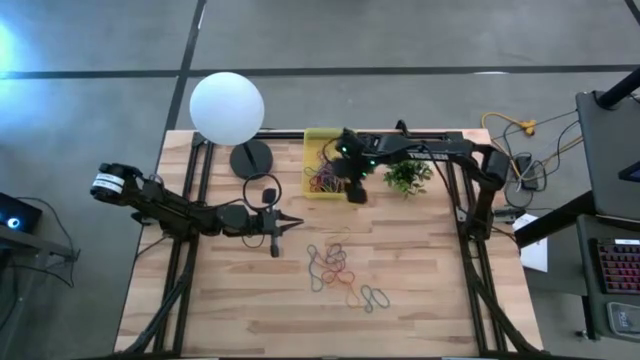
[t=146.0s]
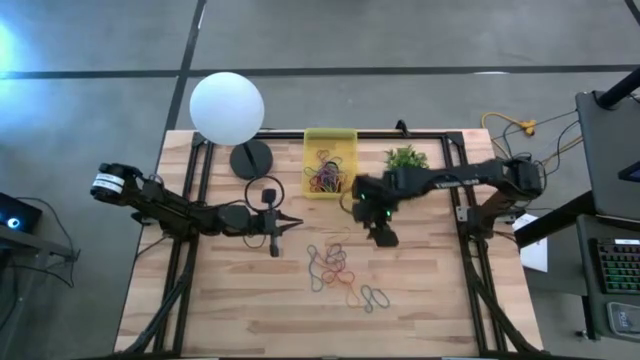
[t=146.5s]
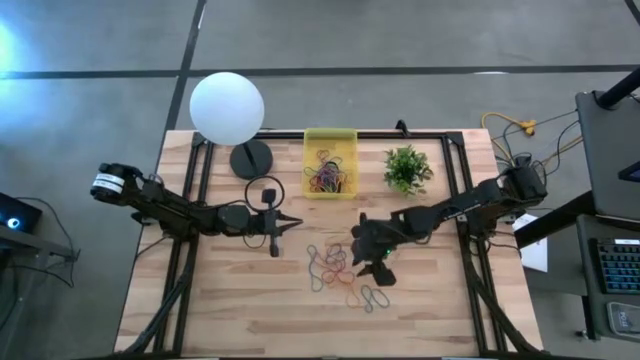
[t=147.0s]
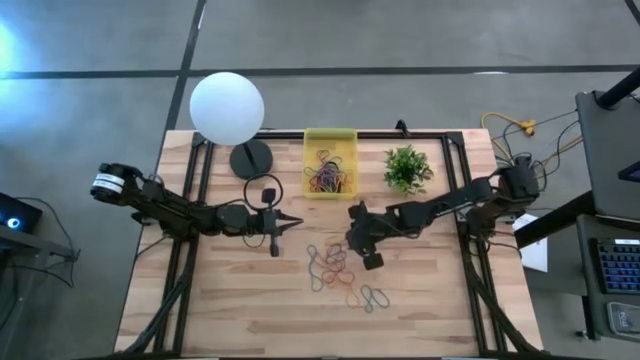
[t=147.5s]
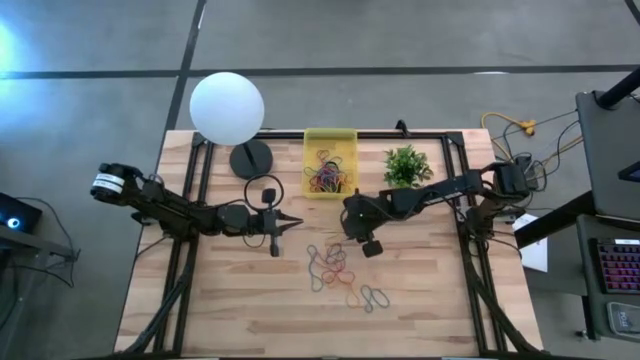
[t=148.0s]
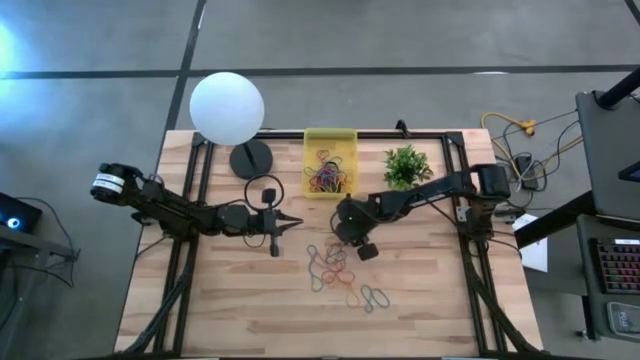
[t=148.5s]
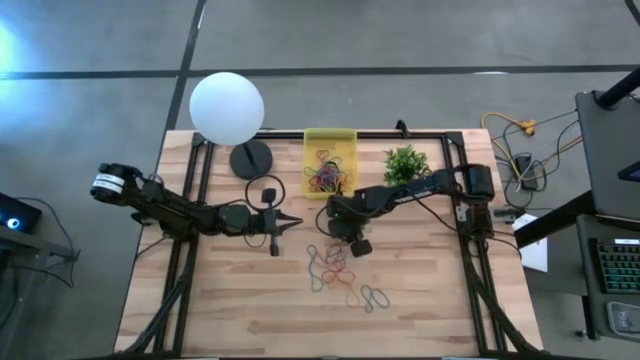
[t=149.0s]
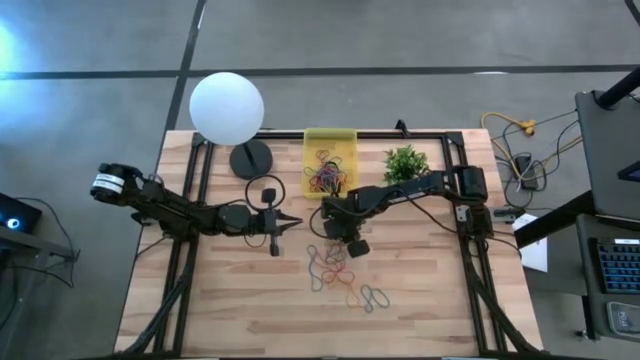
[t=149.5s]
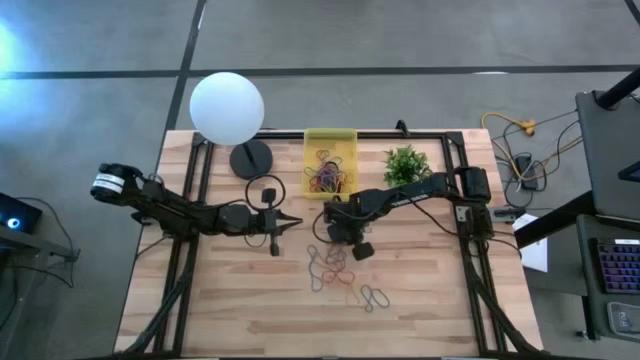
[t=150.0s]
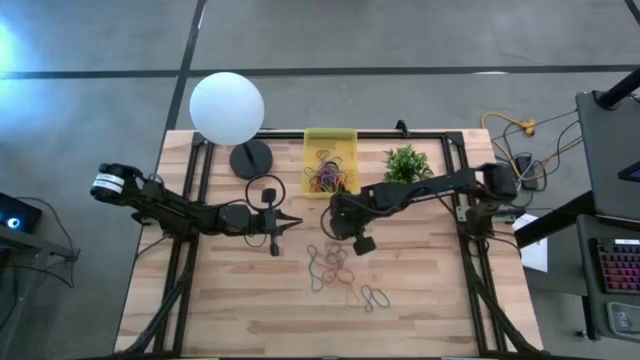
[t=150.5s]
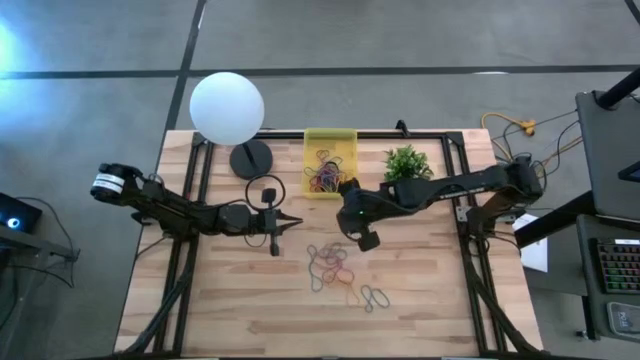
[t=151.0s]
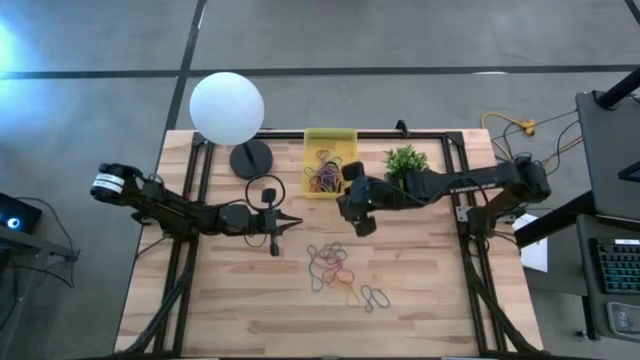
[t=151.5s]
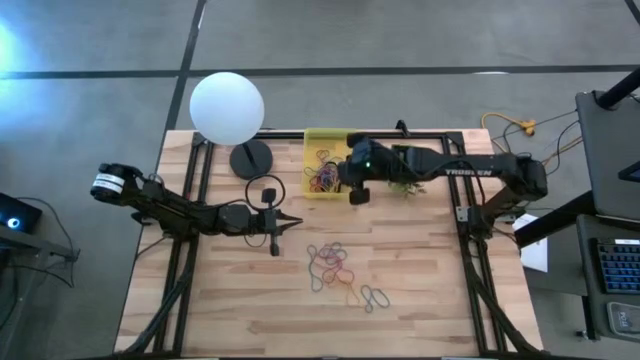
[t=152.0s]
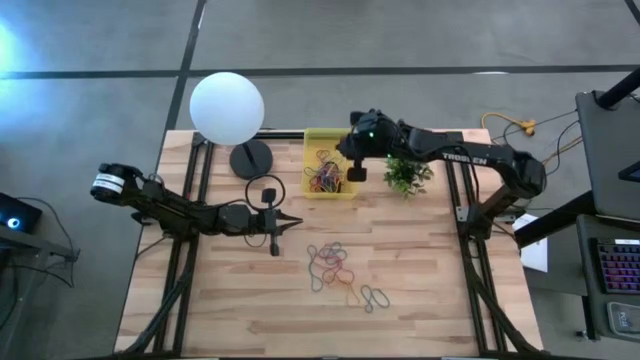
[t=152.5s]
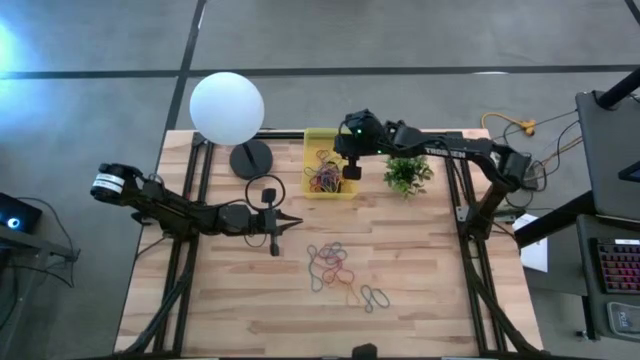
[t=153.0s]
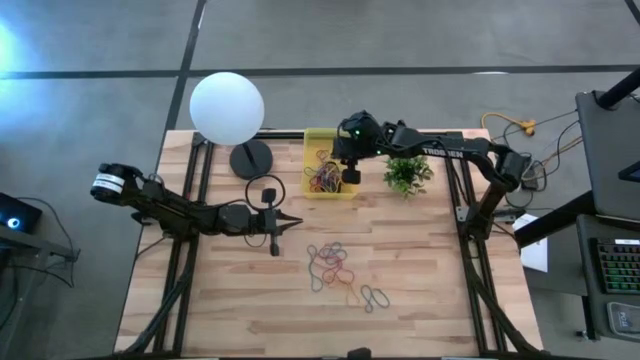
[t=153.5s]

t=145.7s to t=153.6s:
Task: Pick and place rubber bands into bin
Put the yellow rubber band into the yellow bin

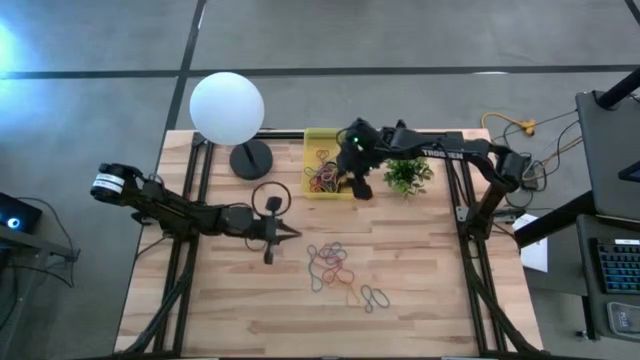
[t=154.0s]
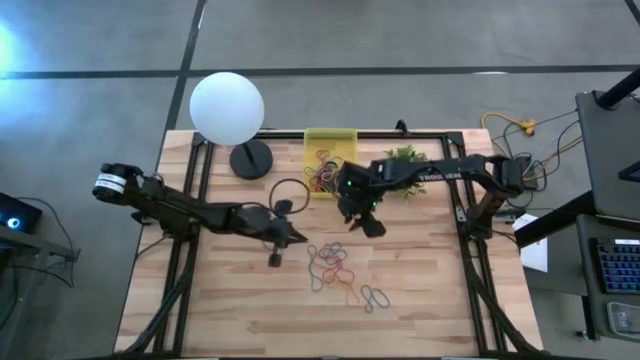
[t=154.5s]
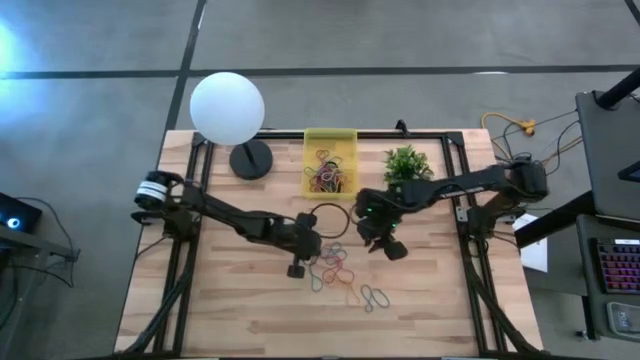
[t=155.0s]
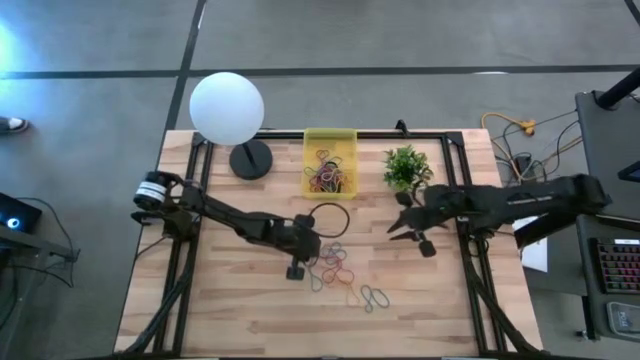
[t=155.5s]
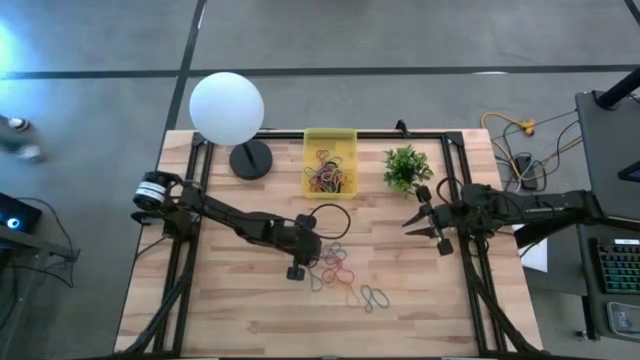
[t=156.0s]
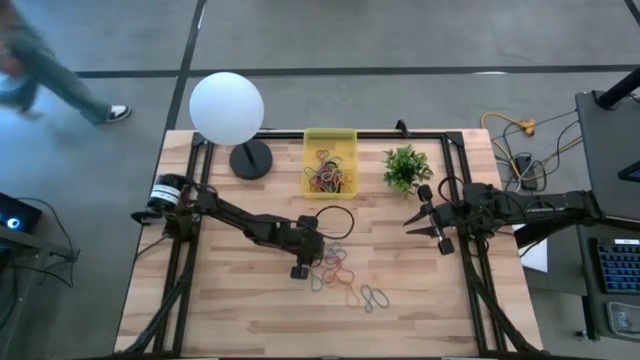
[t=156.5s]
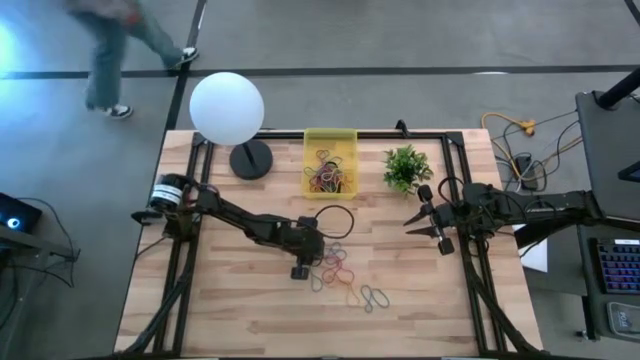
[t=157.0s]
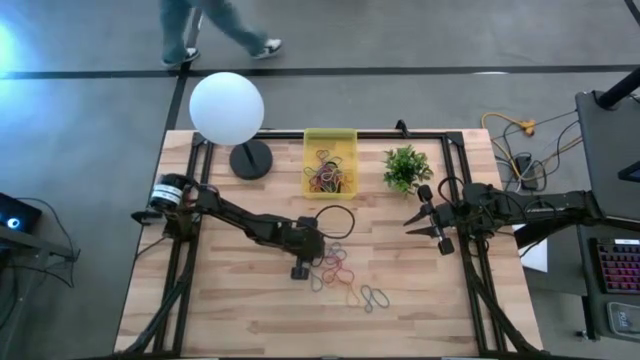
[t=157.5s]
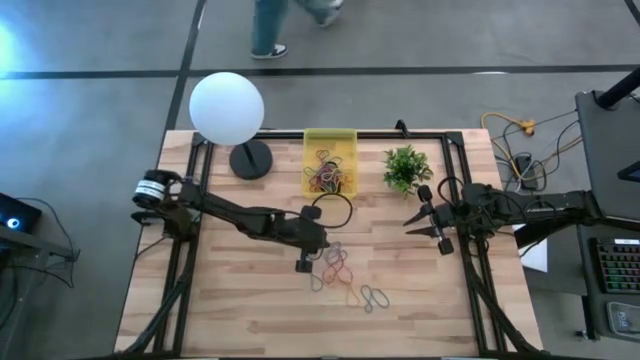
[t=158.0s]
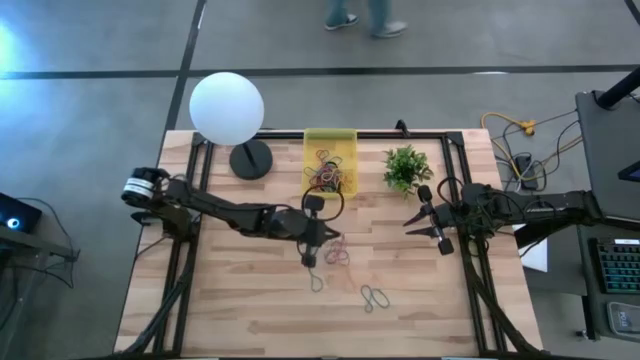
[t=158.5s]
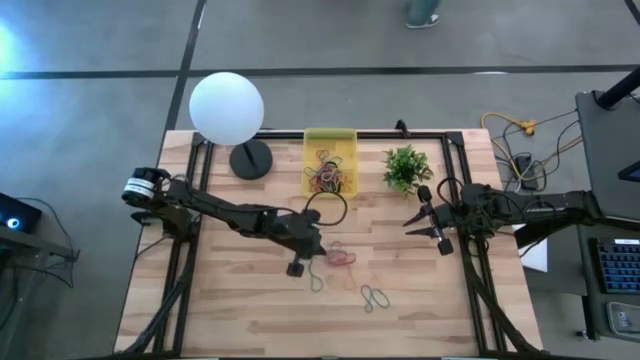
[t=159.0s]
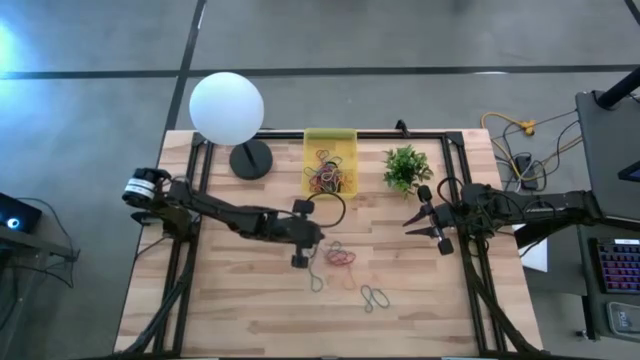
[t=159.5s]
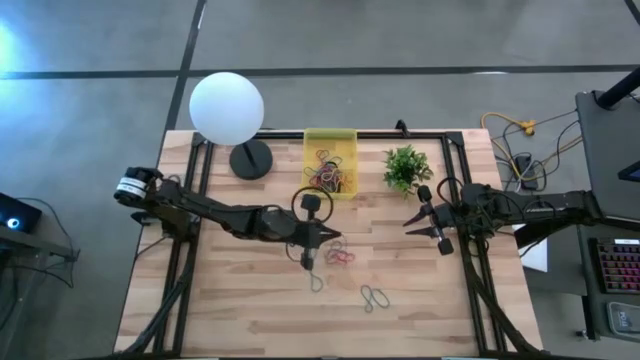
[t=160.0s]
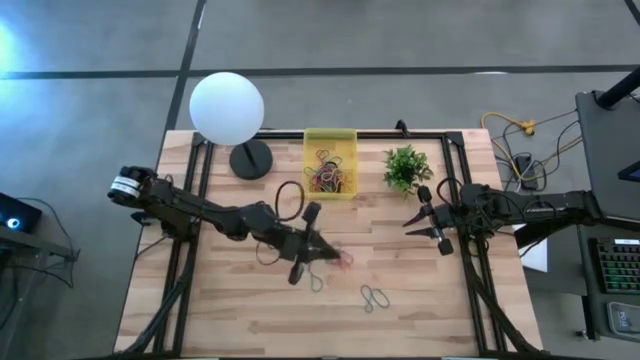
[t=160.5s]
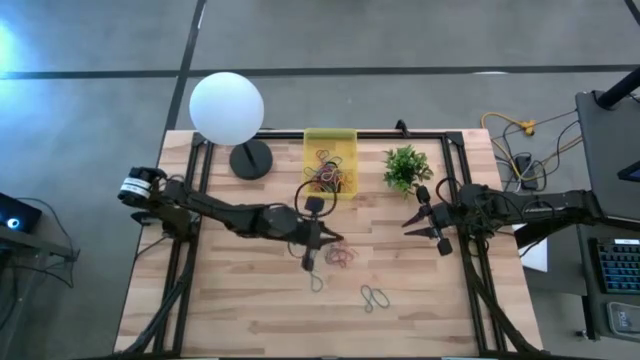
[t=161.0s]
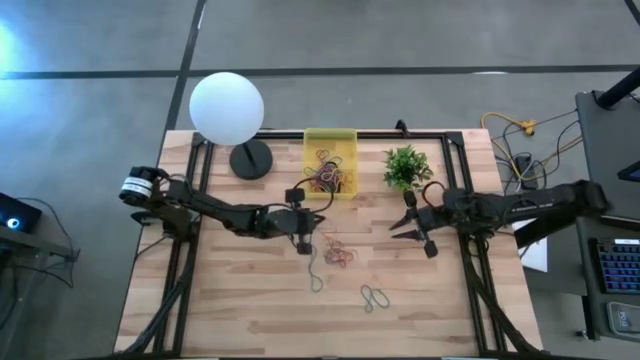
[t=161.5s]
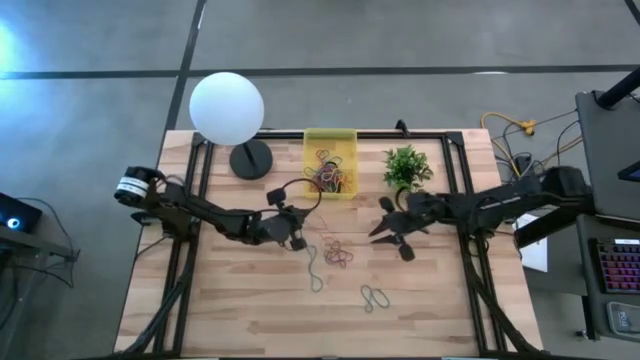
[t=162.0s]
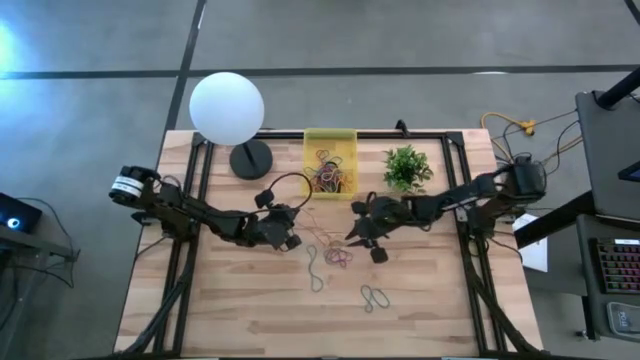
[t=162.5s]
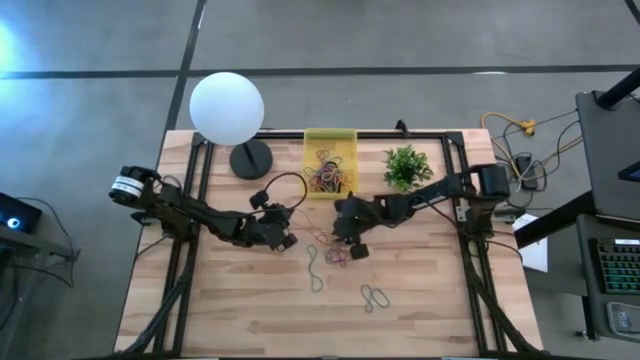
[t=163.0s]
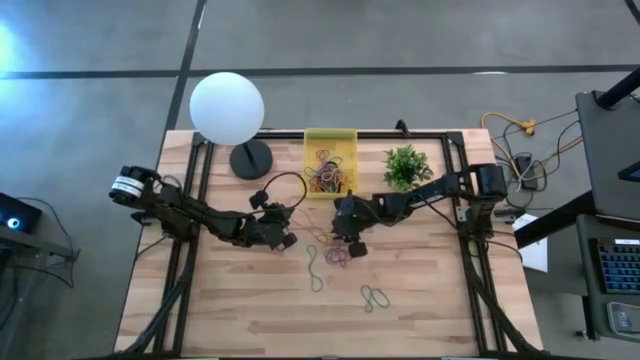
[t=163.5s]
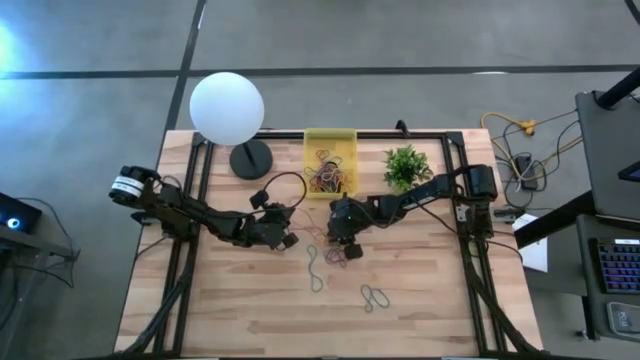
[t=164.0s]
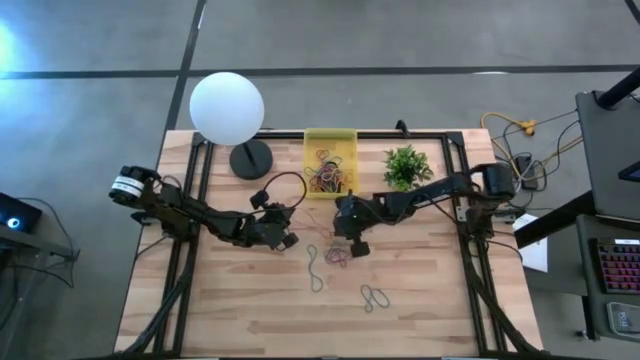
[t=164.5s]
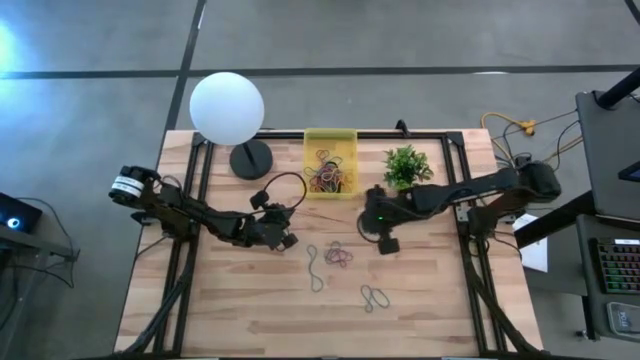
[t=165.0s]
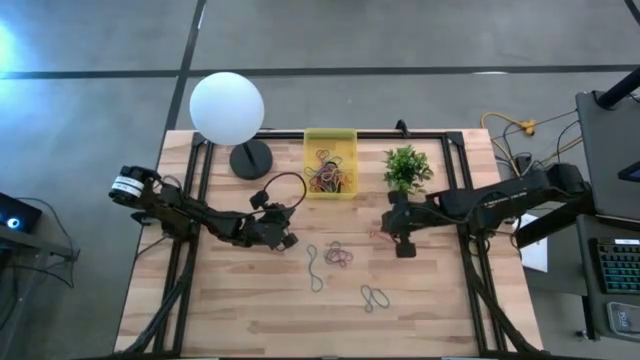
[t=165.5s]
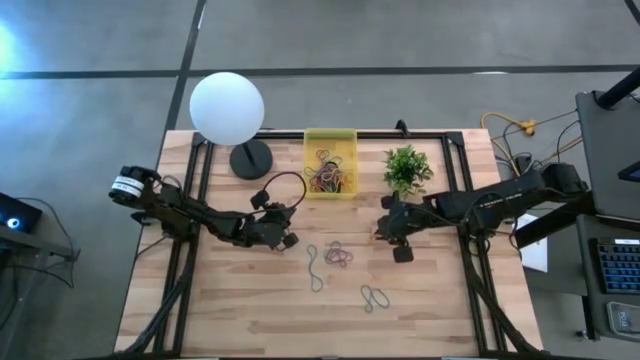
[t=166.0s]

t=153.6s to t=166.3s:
Put the red rubber band into the yellow bin

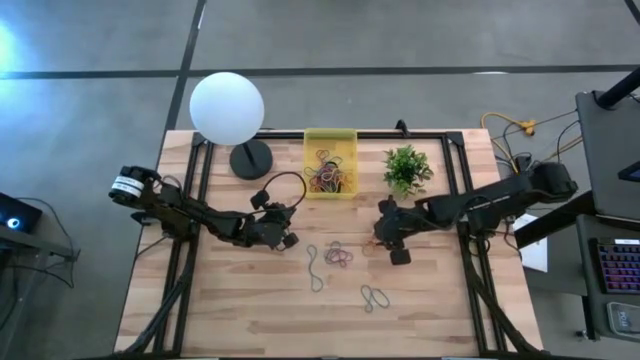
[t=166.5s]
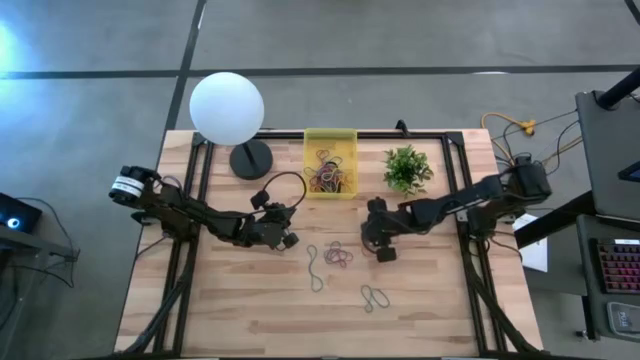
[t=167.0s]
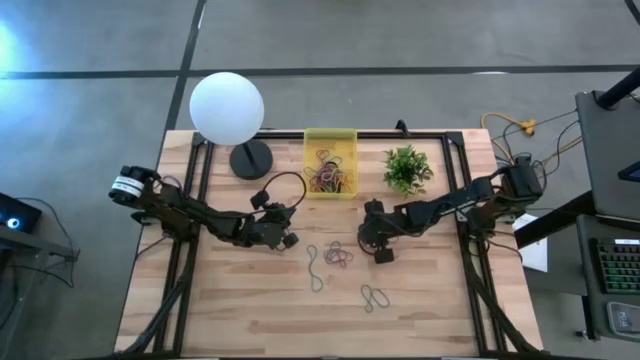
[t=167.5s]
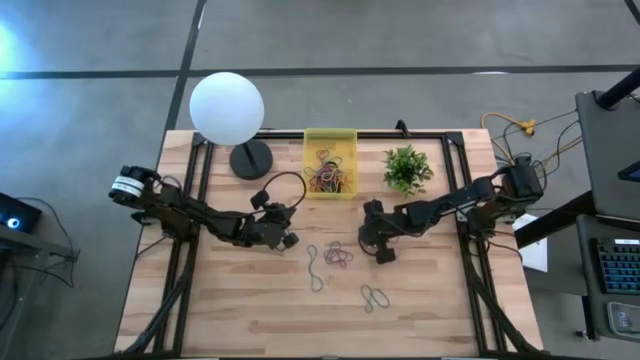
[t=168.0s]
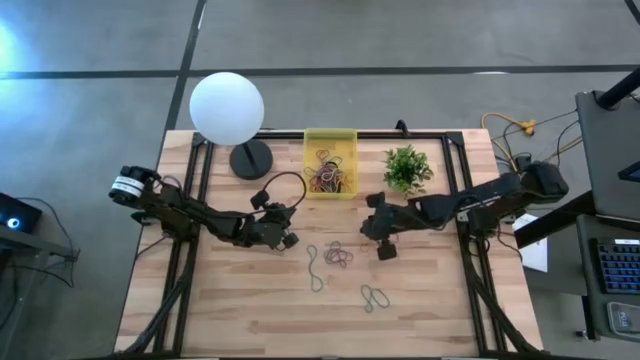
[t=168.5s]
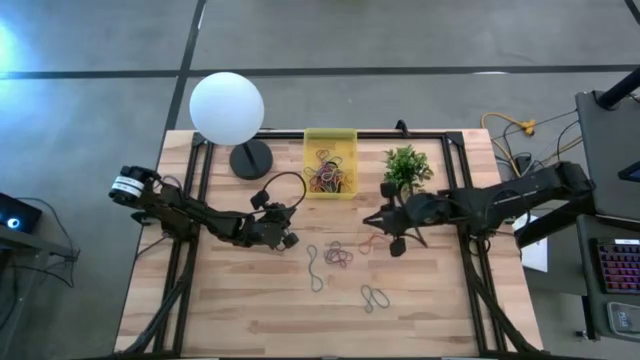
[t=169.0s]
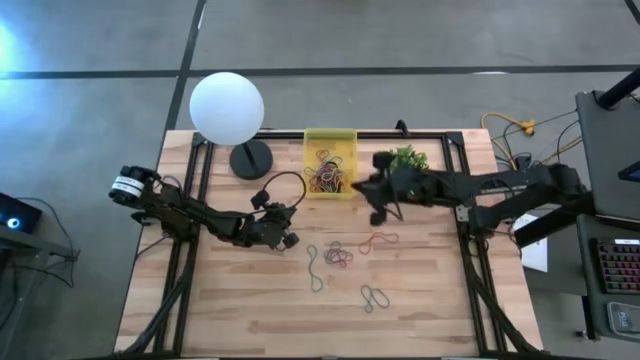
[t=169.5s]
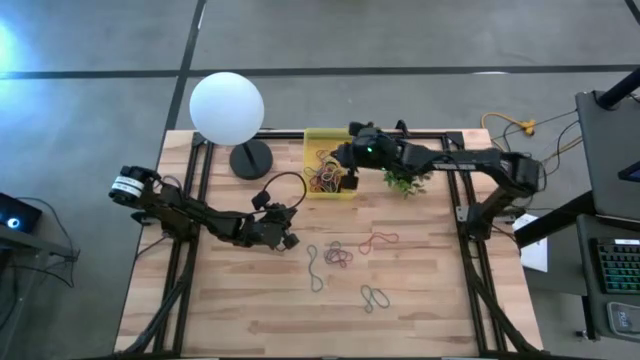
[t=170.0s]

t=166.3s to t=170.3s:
Put the yellow rubber band into the yellow bin
